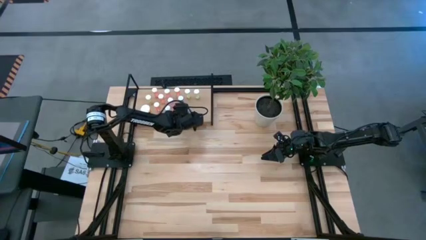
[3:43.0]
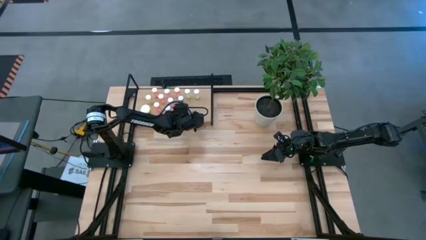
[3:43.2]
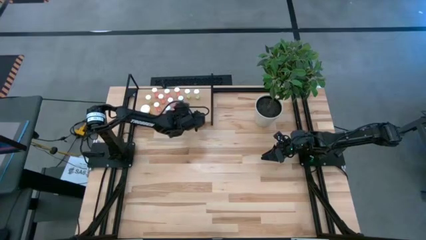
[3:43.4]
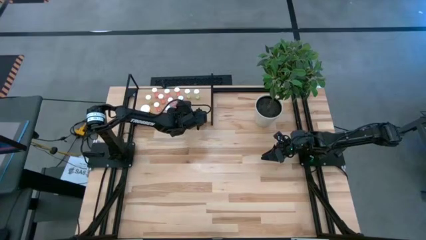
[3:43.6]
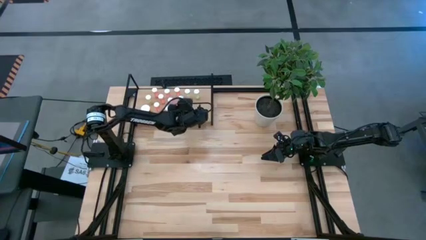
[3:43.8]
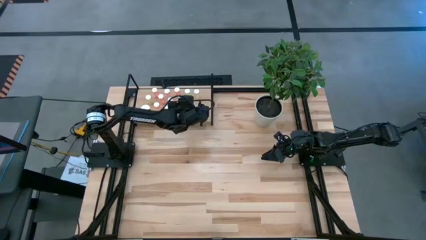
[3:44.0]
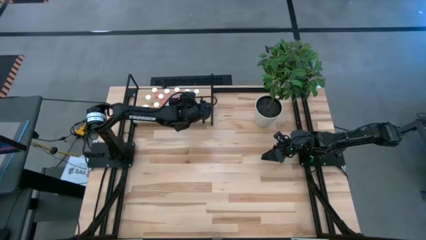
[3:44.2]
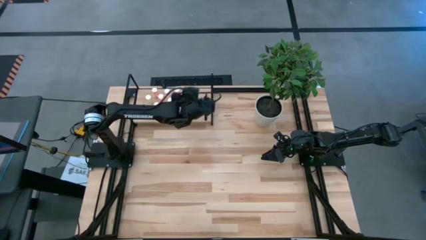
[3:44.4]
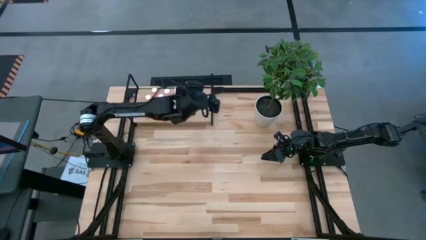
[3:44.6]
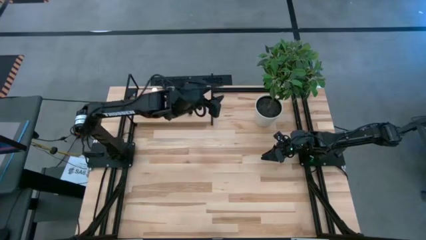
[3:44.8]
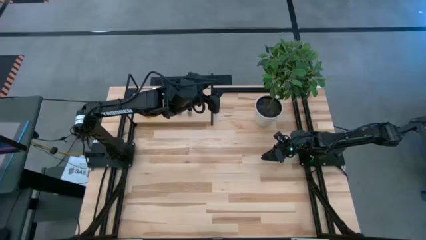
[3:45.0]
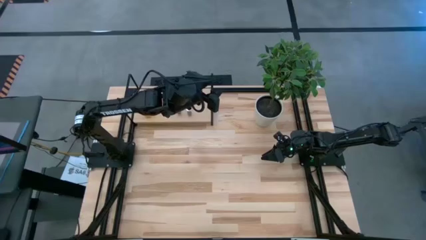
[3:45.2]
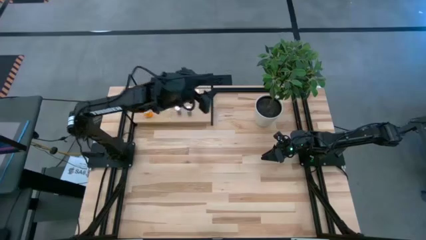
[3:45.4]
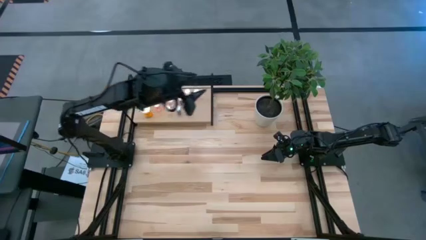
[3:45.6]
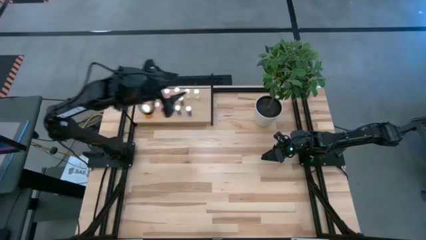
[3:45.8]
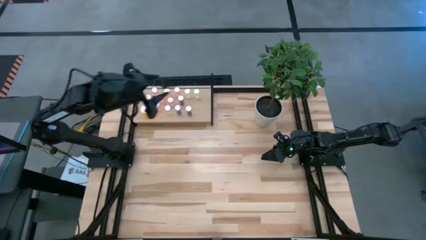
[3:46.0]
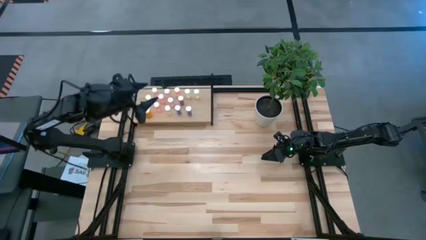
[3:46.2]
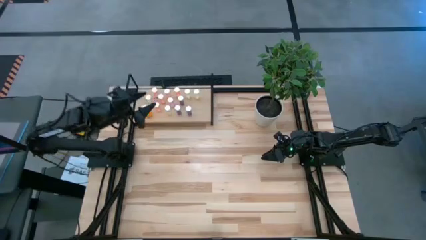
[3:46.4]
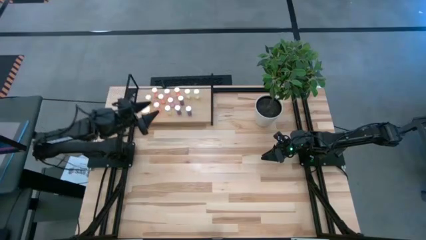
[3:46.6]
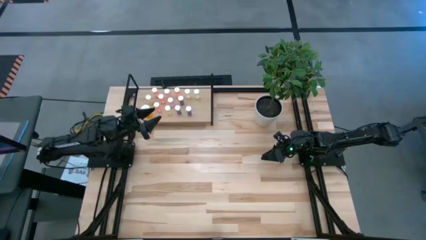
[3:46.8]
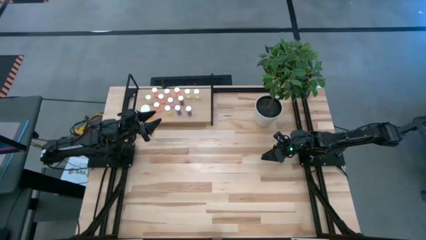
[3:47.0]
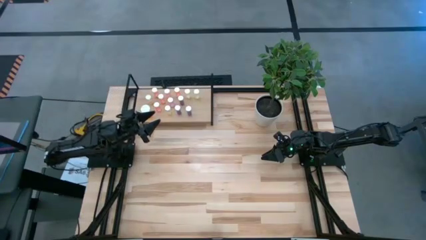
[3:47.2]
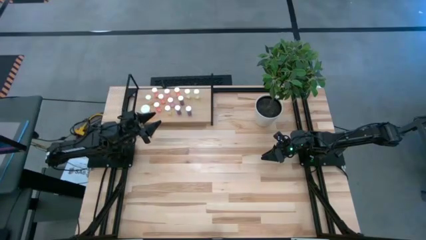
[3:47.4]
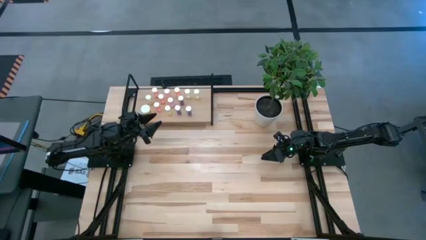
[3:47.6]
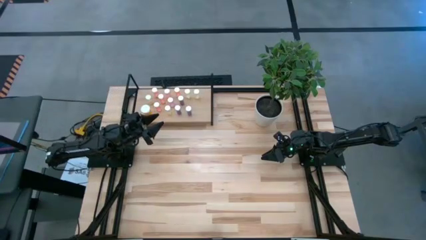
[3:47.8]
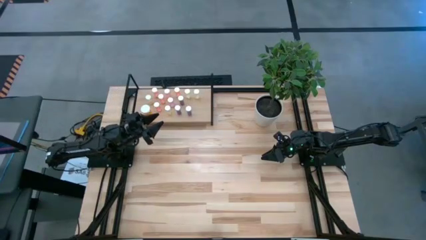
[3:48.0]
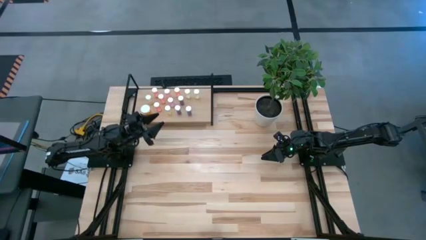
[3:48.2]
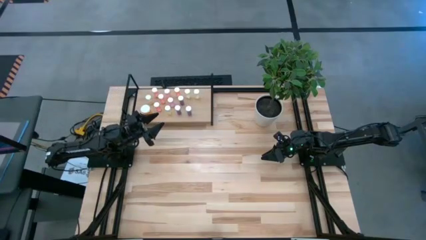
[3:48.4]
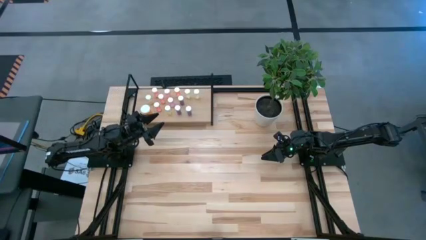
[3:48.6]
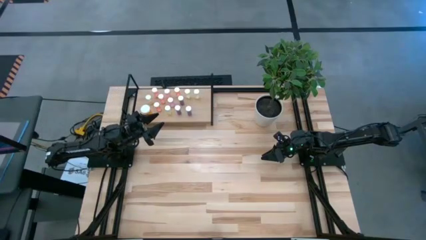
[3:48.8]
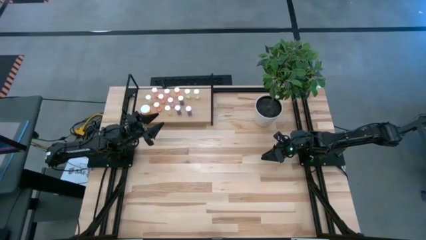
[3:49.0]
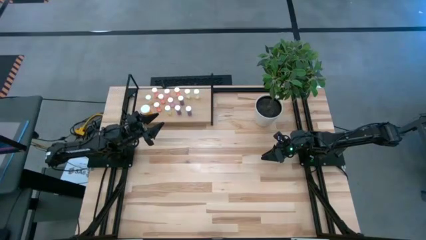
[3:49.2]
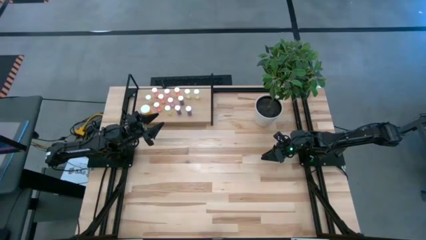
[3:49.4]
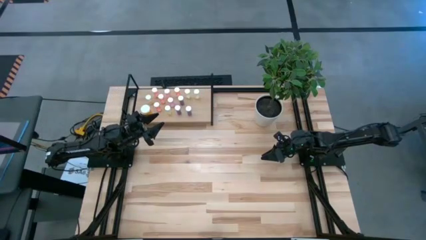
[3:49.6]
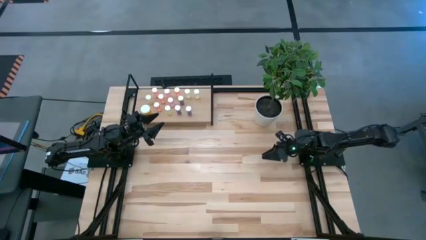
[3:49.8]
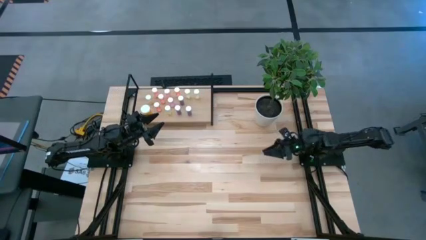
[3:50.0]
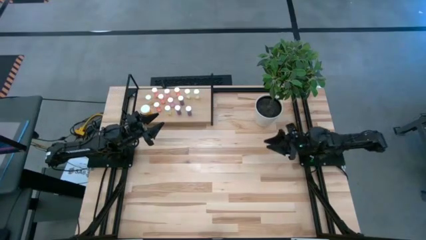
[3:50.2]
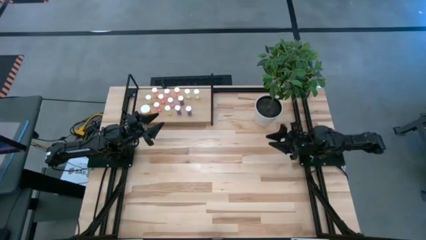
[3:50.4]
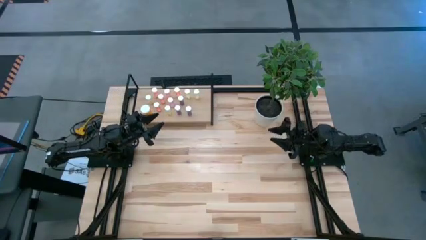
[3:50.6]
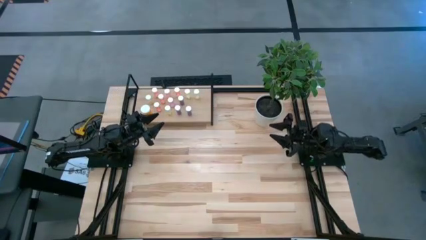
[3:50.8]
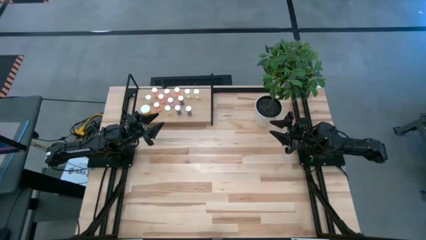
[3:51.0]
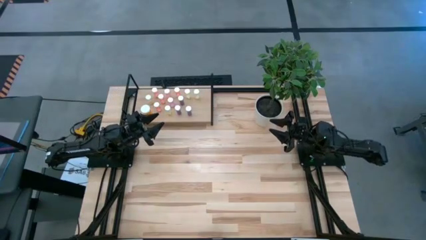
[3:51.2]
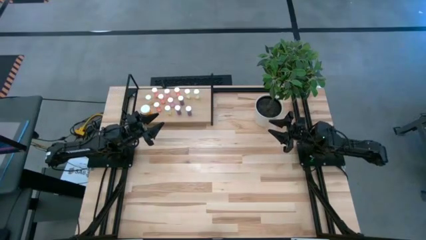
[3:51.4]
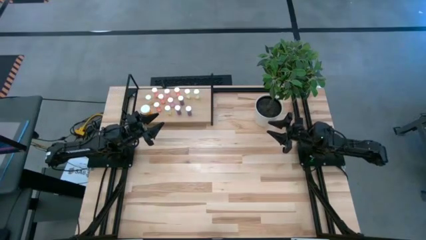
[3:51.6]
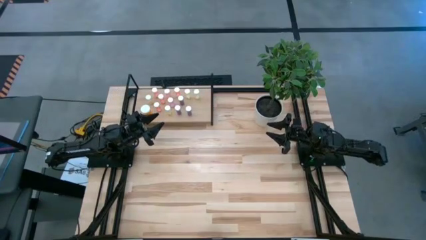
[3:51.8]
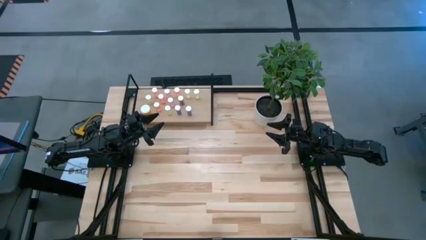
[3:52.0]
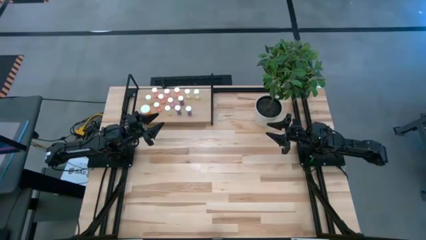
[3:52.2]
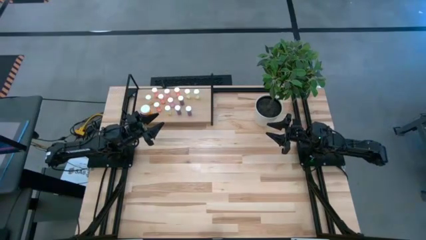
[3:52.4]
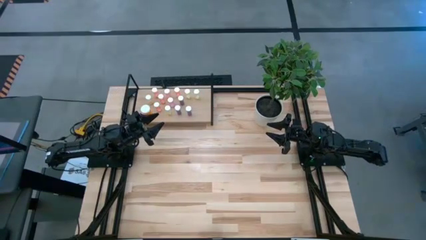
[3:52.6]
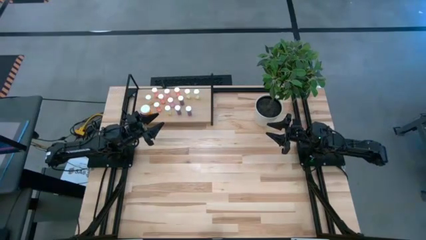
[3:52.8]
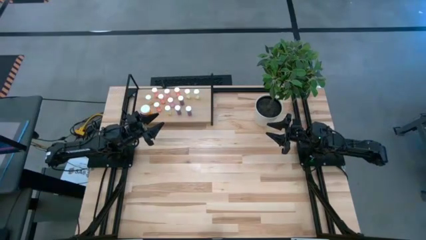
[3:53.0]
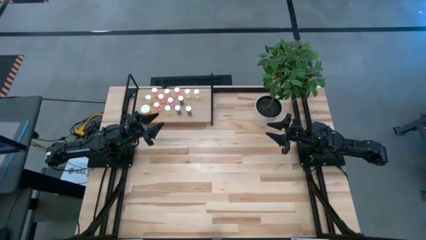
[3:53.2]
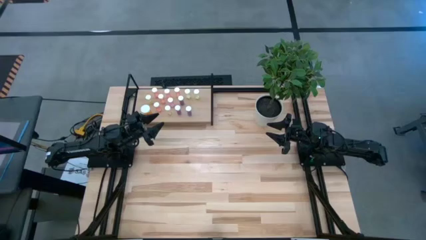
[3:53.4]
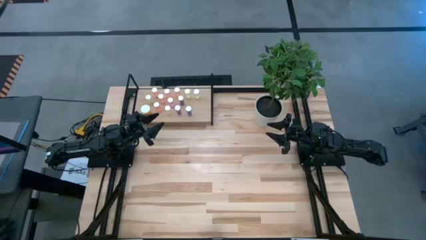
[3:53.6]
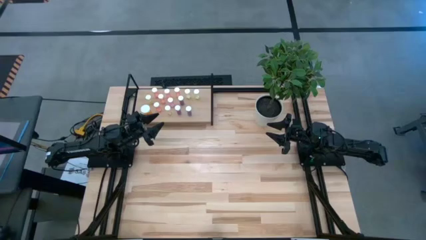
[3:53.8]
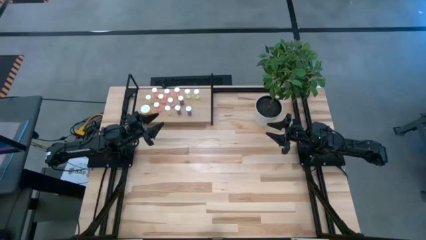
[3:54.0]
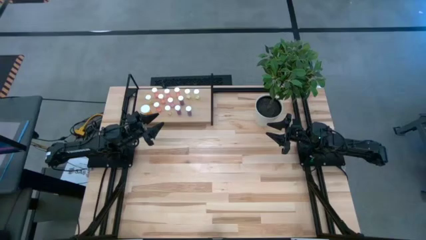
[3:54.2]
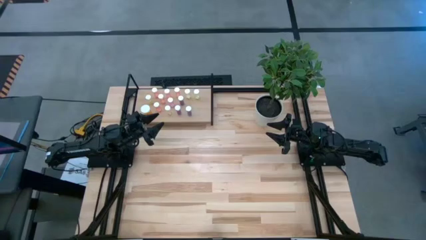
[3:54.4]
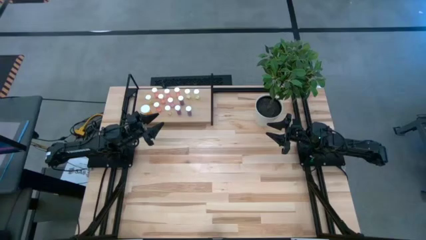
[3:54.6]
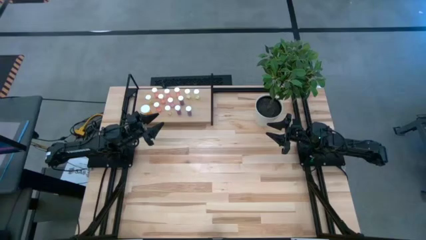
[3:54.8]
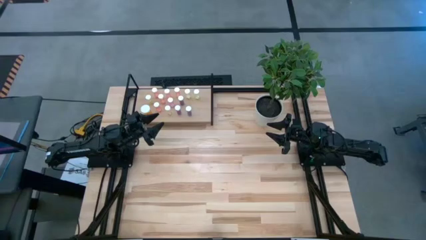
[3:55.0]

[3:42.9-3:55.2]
Task: Pick and place medicine bottles onto shelf by color
Return to Home Position
